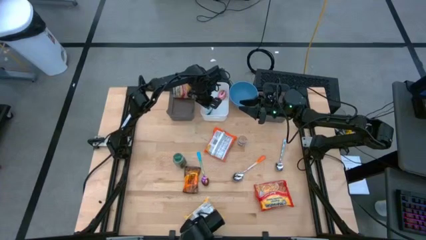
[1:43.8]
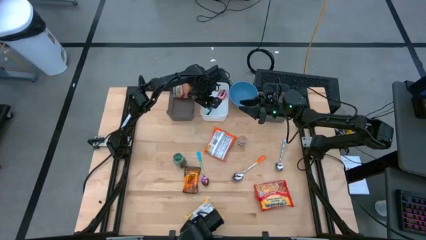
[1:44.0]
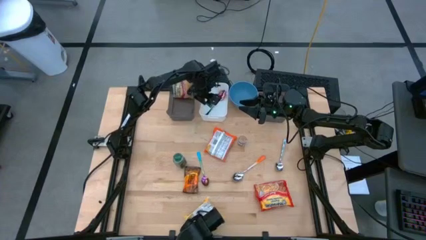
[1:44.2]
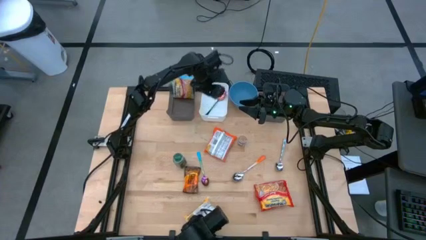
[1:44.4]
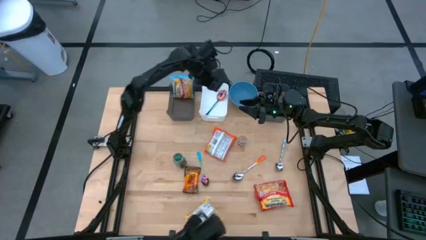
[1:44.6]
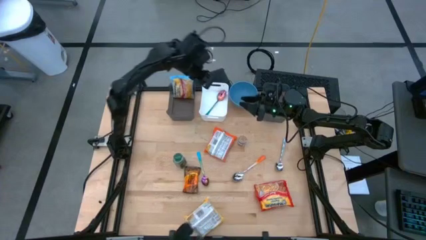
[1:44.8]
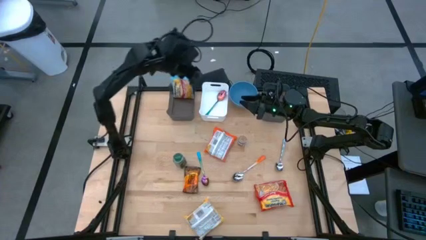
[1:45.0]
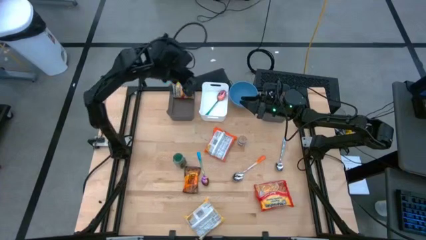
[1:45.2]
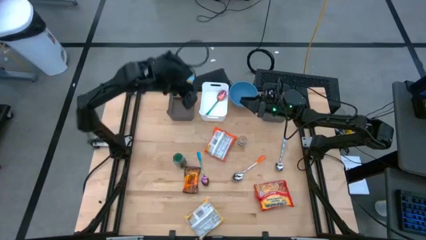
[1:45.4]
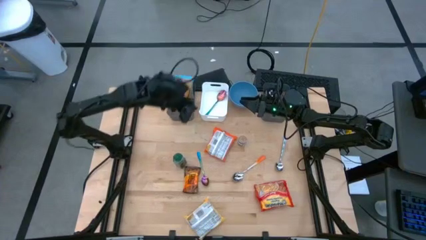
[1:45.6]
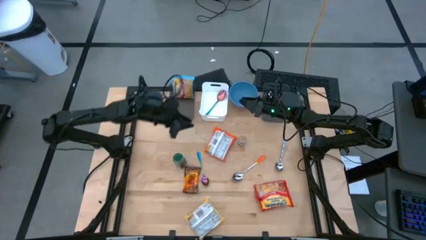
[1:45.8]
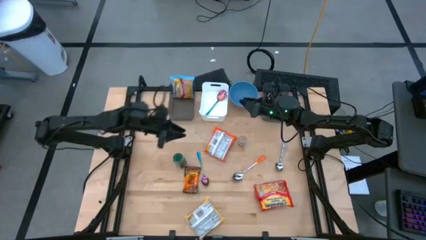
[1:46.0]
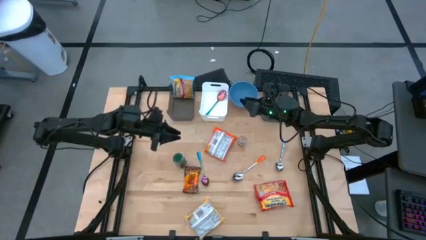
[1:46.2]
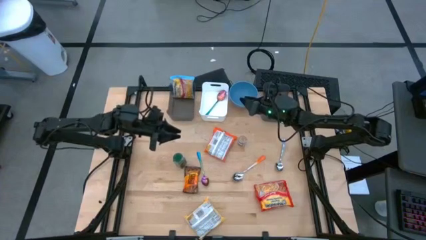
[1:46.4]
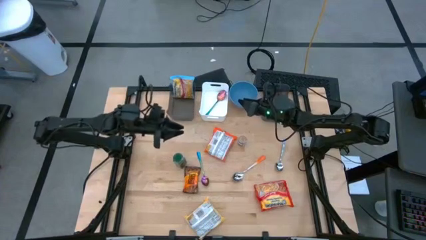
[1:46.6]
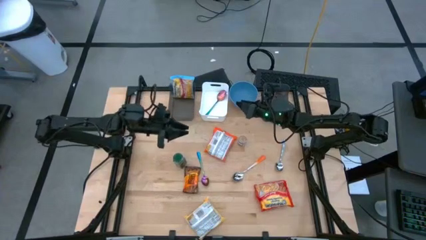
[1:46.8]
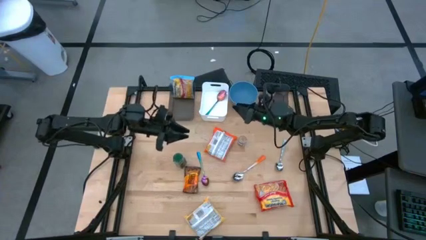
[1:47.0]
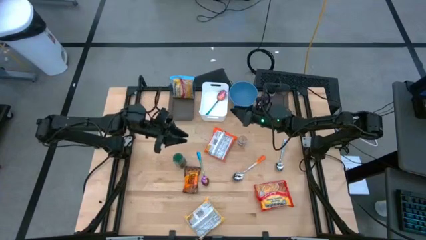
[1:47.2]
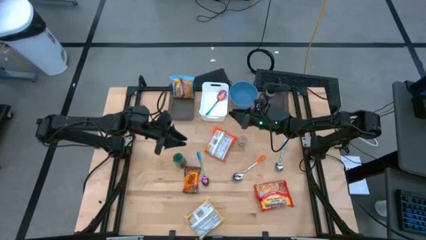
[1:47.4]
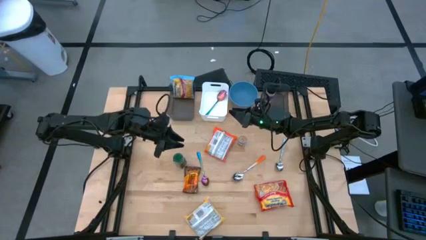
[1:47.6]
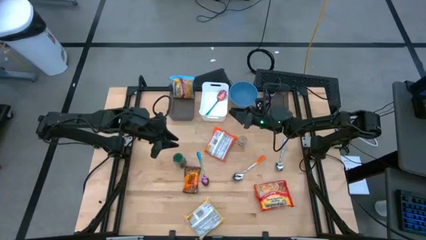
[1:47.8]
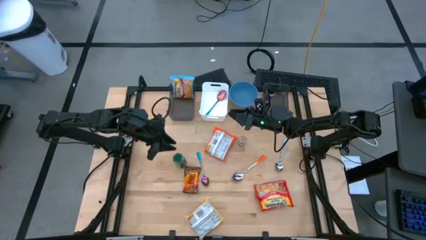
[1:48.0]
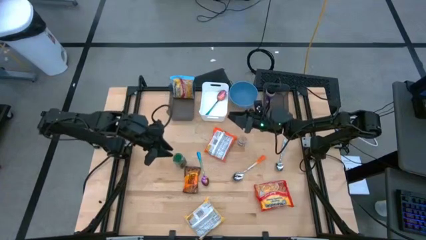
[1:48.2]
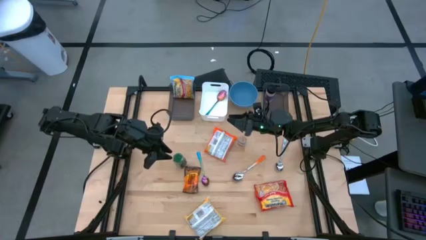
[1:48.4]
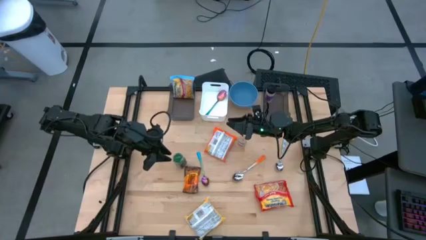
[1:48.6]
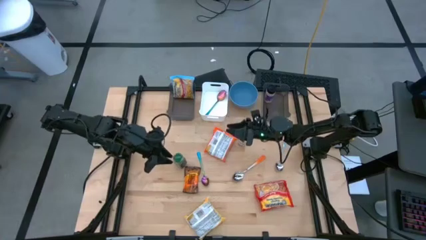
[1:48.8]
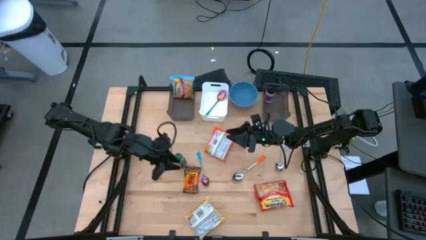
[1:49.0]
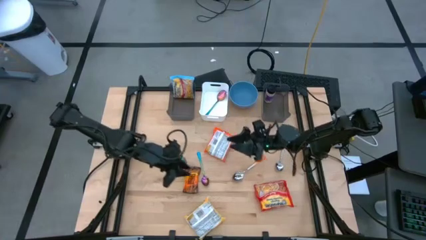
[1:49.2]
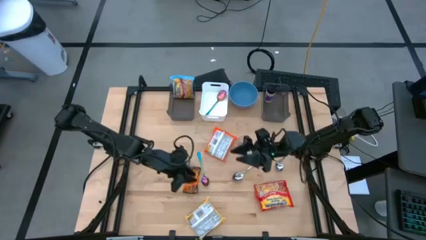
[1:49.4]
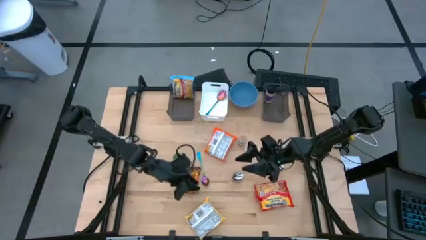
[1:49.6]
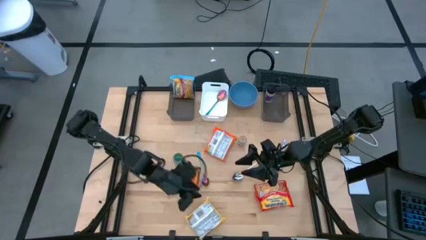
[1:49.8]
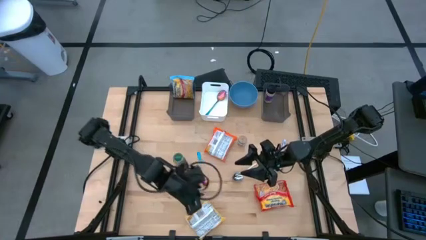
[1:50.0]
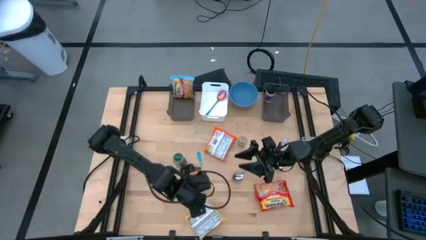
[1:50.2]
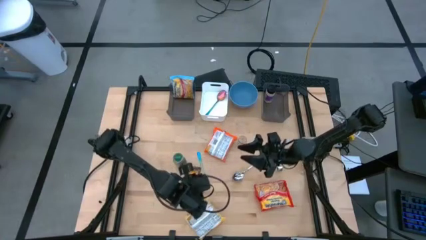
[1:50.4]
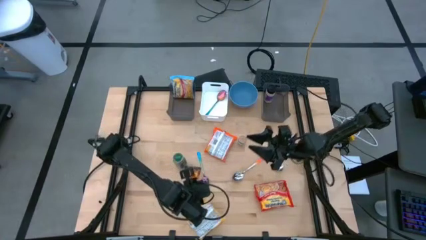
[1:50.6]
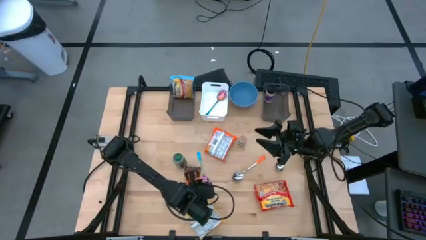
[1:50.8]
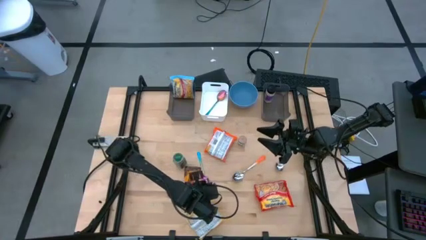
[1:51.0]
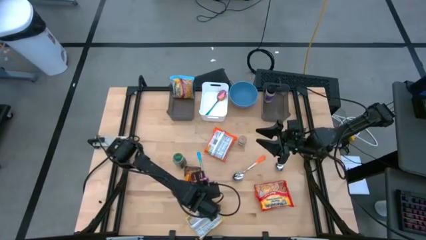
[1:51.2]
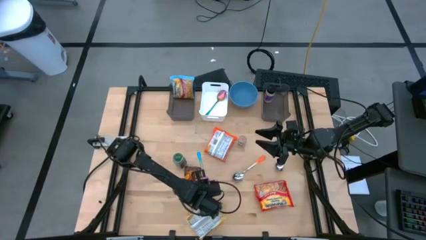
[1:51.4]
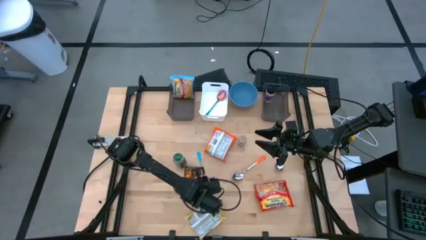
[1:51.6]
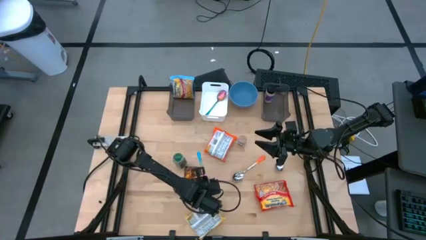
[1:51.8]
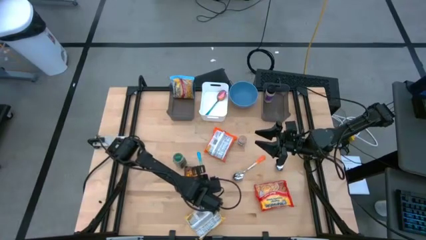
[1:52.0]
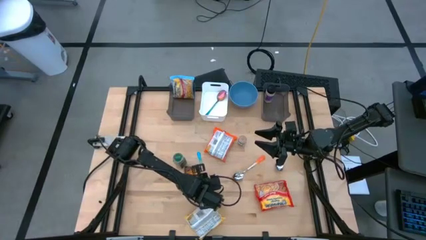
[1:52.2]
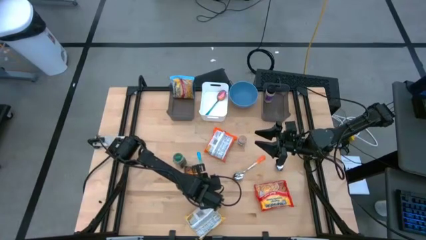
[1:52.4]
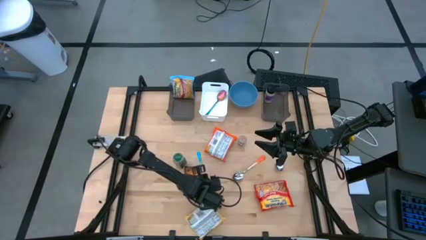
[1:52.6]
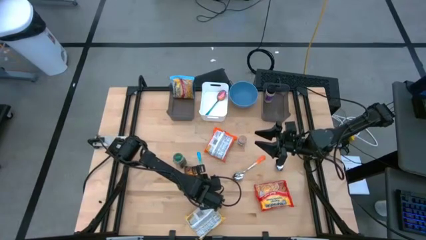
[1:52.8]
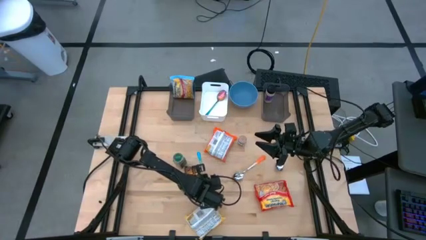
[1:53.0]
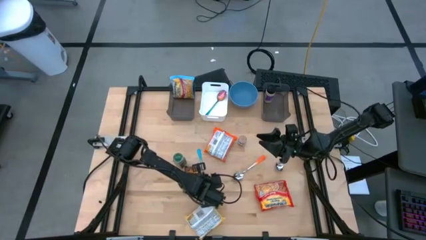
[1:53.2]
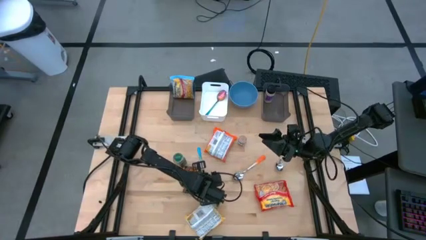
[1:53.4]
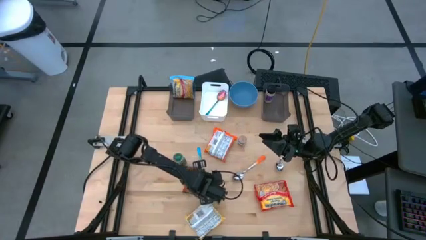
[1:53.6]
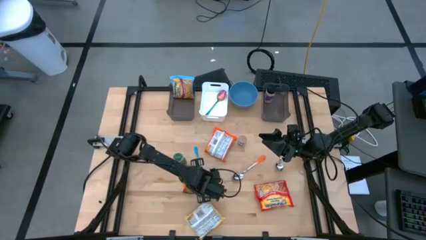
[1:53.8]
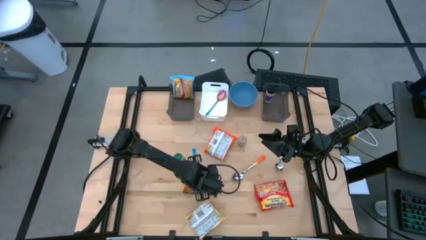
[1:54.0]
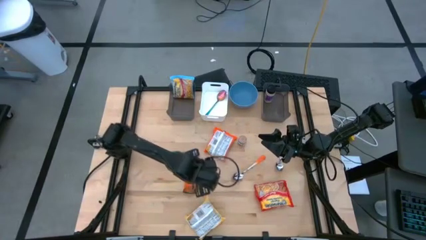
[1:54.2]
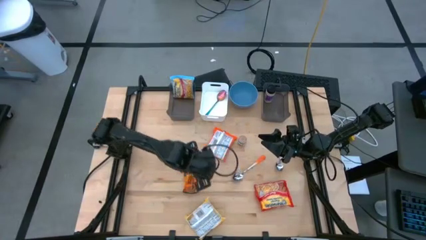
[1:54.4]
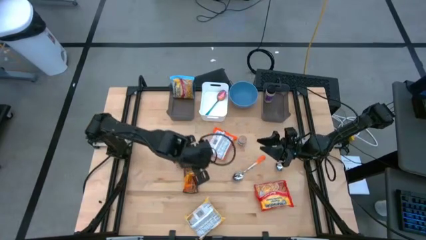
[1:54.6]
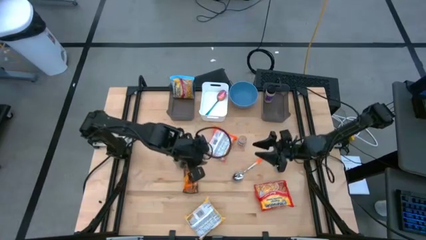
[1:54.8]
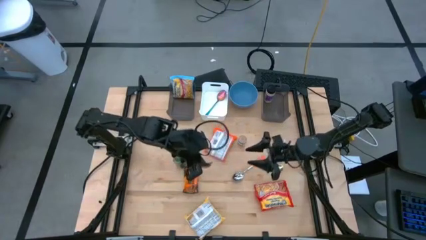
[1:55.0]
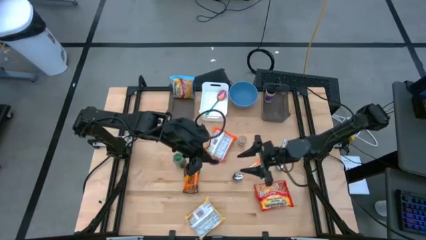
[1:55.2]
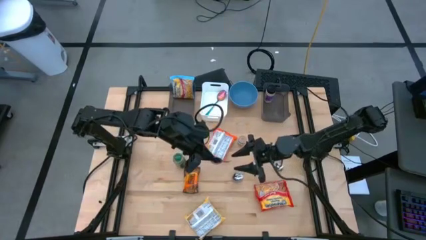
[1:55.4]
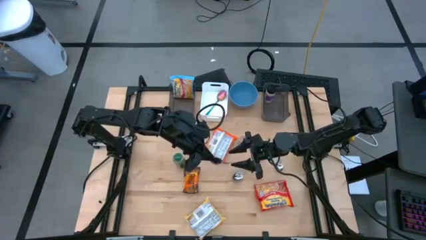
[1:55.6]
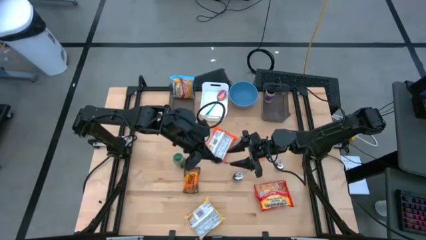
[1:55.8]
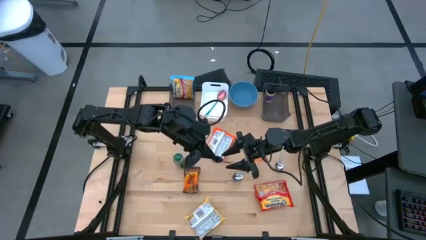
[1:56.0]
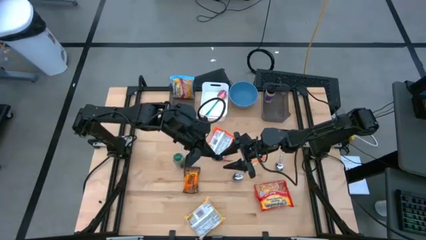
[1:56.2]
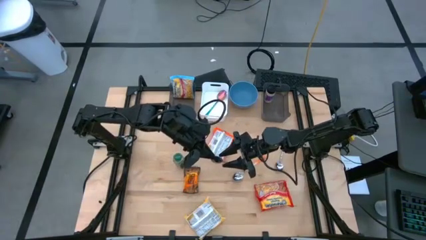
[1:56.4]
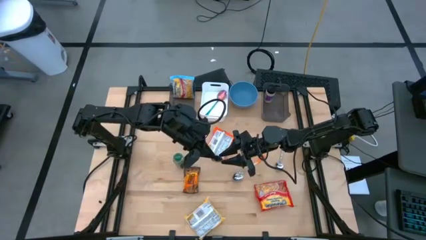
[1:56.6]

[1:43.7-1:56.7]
Task: Pick & Place Food Item
Put the blue spoon into the white bin

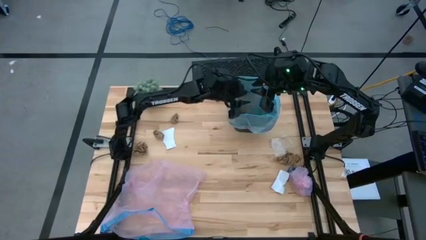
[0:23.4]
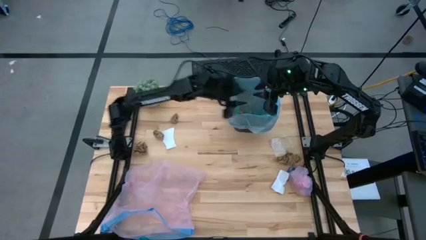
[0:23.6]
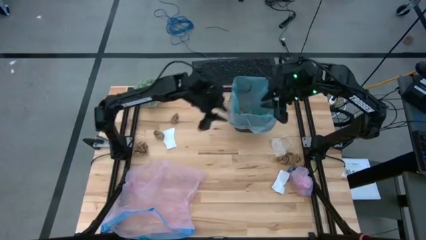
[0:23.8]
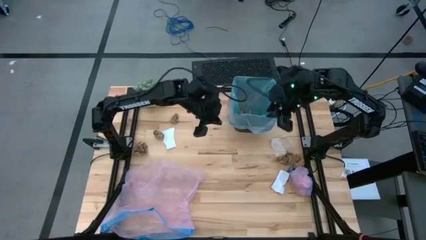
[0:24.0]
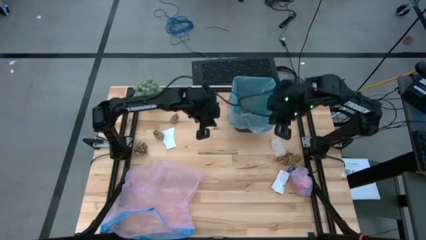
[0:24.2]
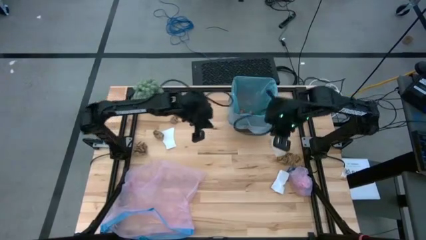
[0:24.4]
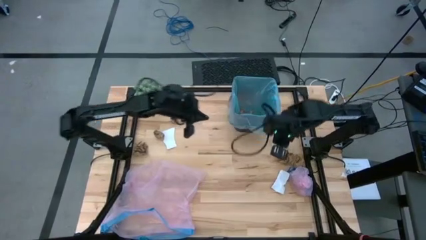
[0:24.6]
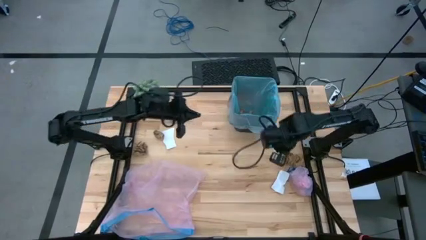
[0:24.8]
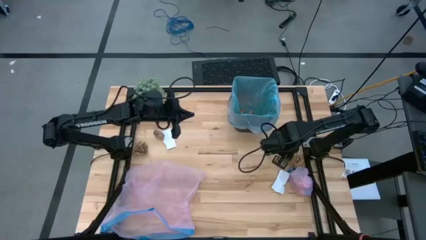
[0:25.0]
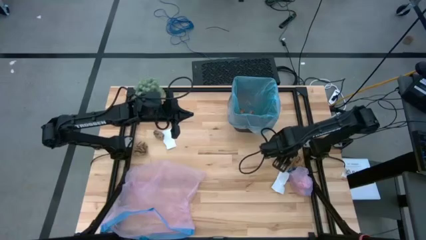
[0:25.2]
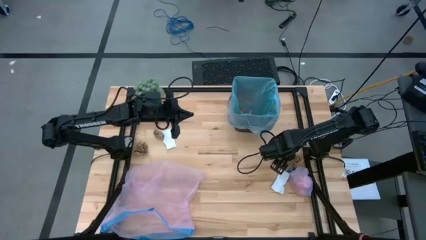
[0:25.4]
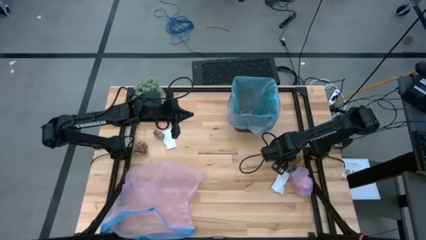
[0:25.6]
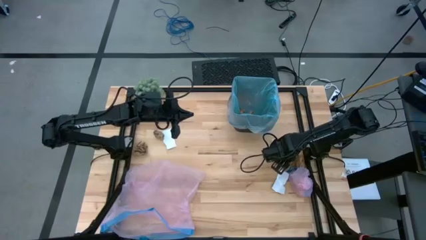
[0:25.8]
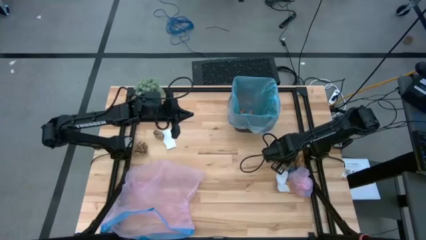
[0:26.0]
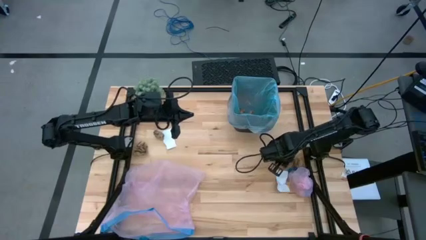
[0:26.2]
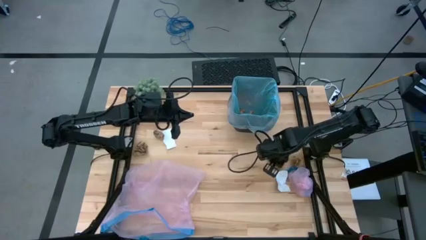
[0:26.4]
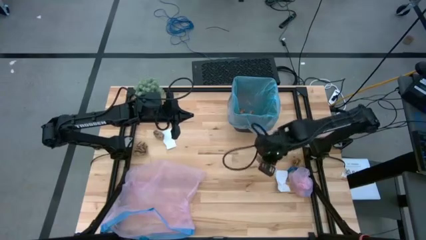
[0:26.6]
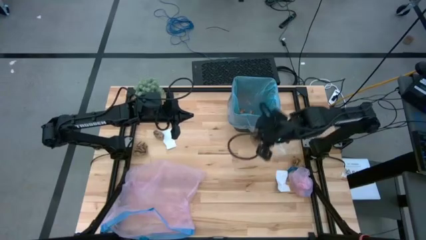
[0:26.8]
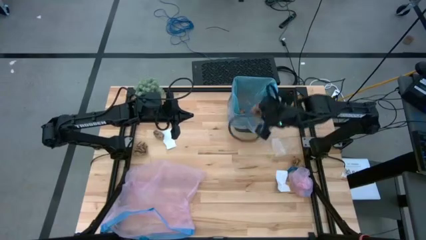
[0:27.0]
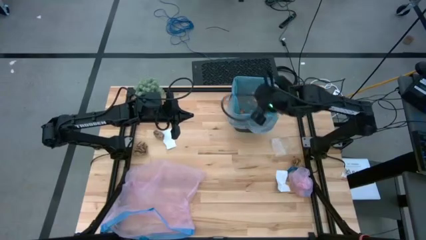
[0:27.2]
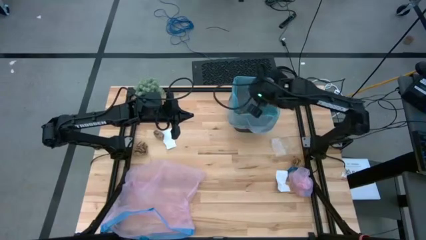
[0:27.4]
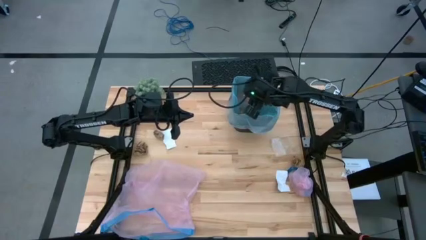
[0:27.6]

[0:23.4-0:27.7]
Task: place trash/remove bag and relplace
Put the brown napkin into the trash bin
